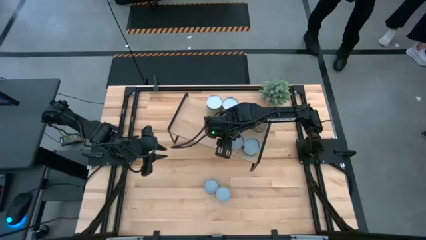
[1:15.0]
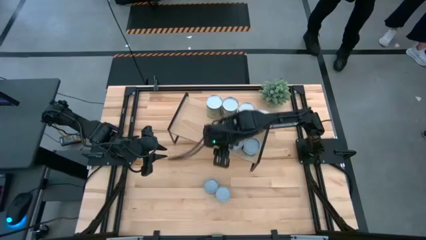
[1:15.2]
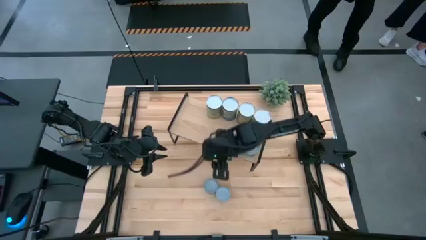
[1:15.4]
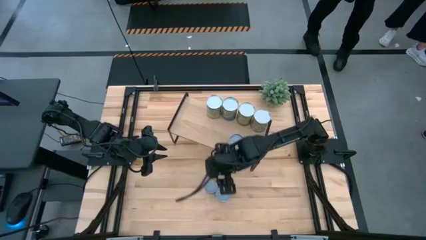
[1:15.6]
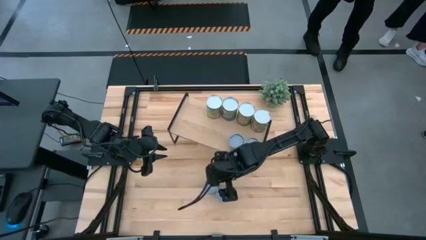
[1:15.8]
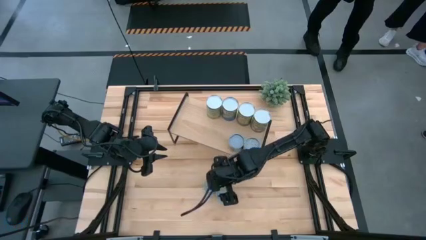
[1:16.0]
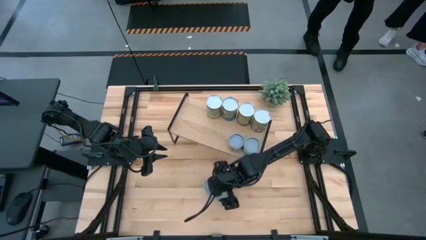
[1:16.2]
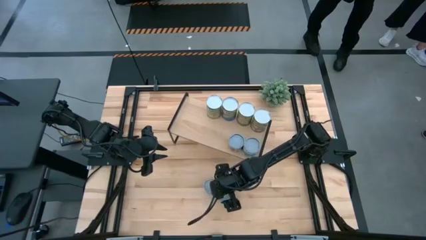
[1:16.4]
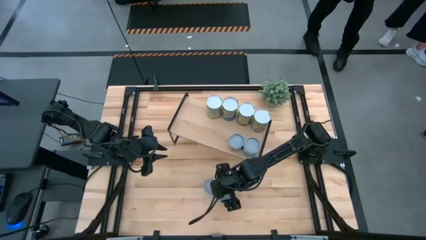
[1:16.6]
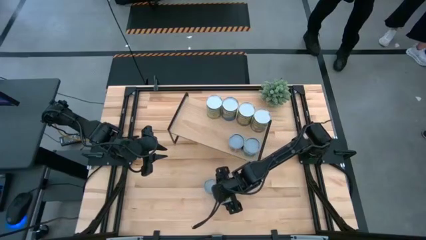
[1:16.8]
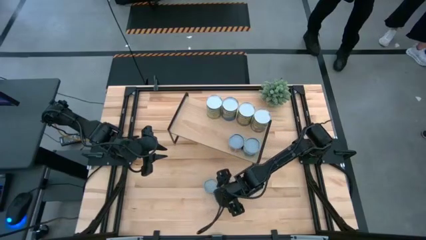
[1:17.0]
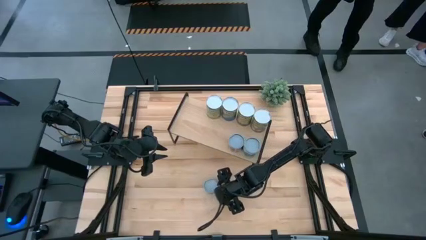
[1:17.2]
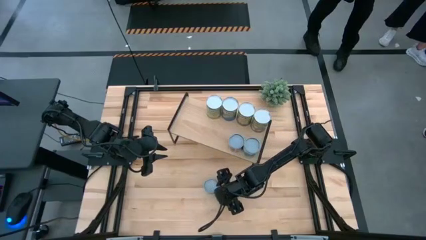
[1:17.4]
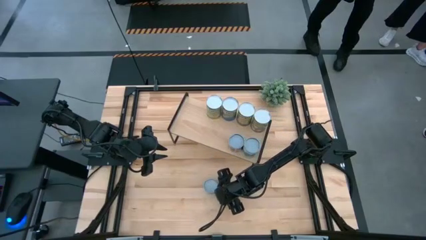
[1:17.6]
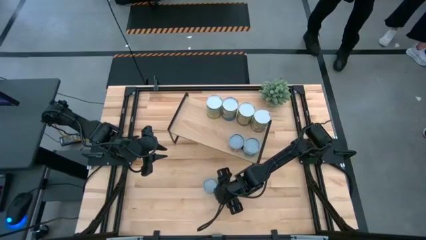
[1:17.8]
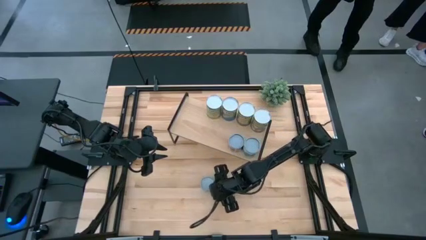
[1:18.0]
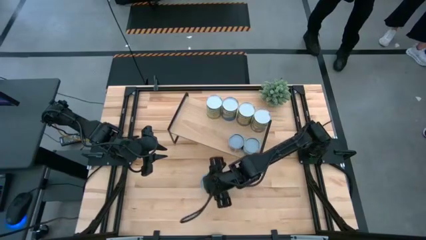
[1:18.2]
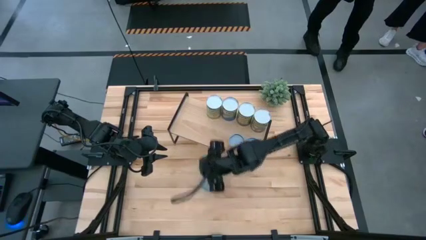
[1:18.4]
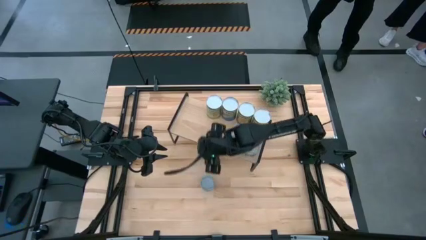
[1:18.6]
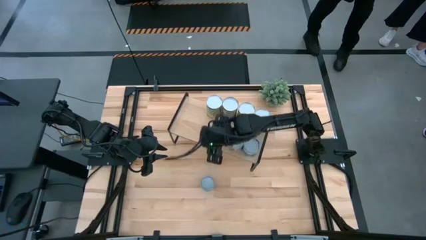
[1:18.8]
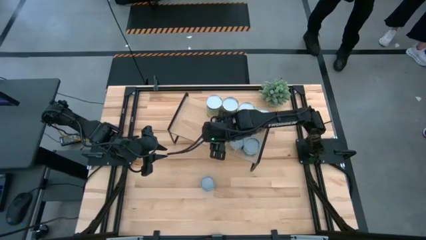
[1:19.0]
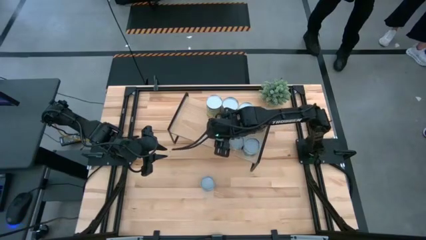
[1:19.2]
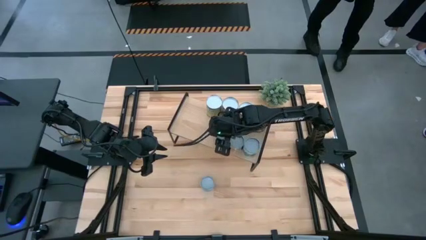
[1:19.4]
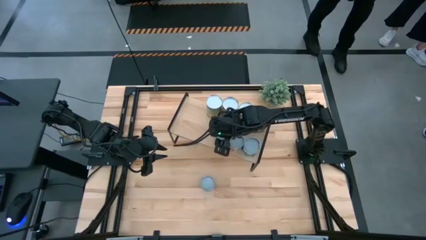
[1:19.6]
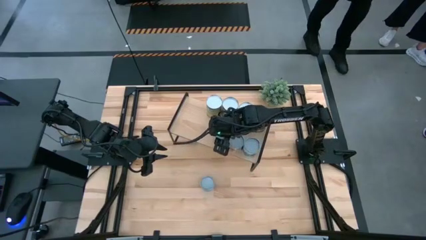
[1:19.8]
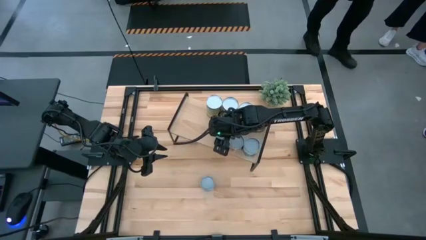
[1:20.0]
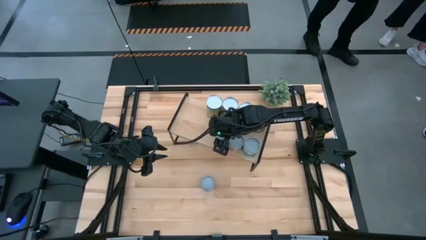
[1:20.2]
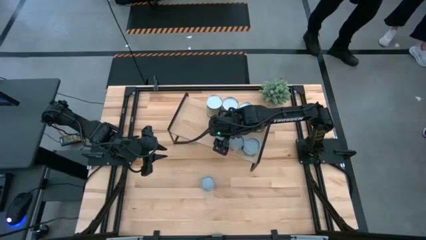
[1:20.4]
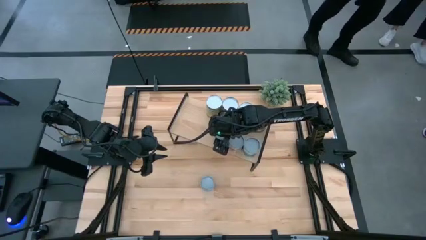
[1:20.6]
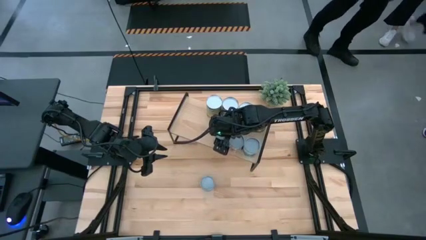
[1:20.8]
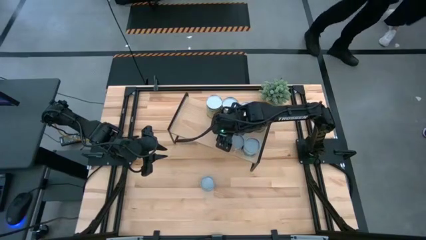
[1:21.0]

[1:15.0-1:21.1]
Task: Pick and place cans onto a shelf
Put the canned green peas on the shelf

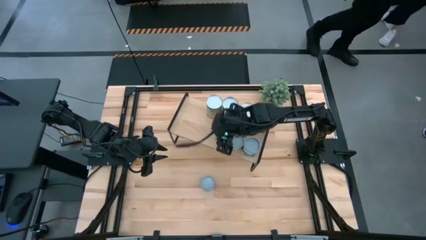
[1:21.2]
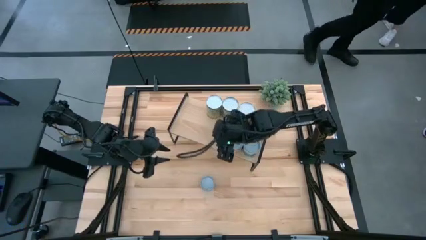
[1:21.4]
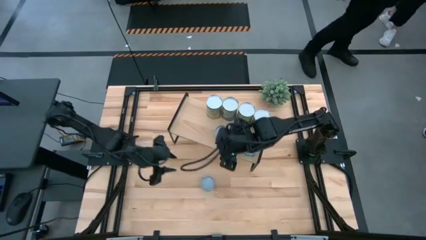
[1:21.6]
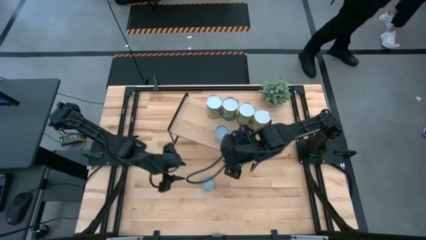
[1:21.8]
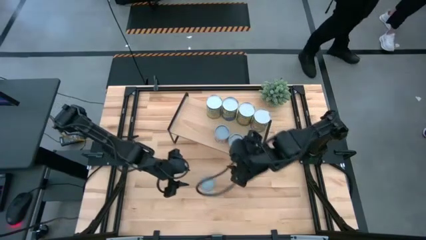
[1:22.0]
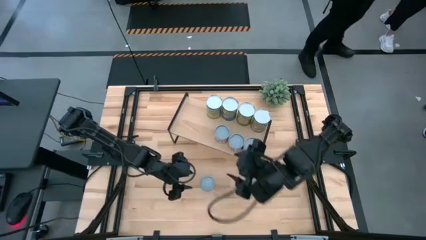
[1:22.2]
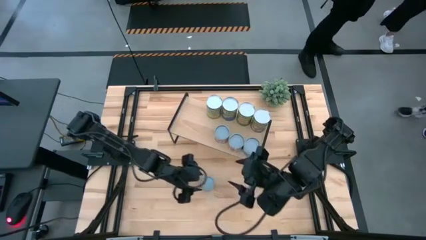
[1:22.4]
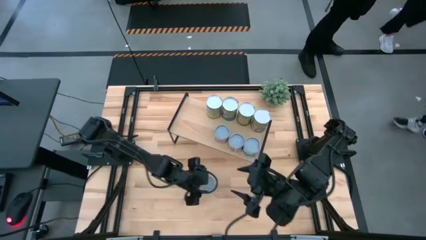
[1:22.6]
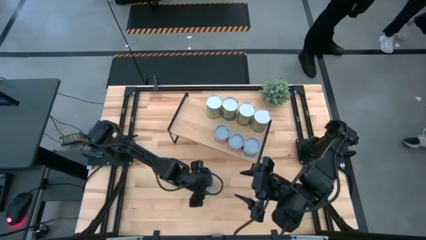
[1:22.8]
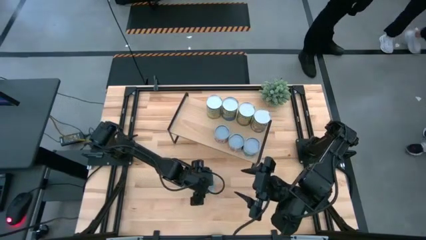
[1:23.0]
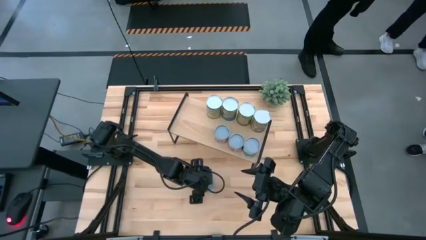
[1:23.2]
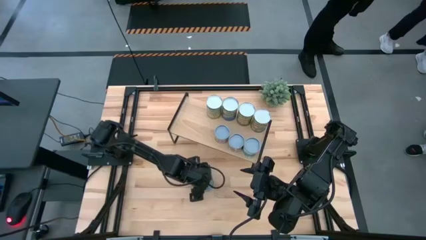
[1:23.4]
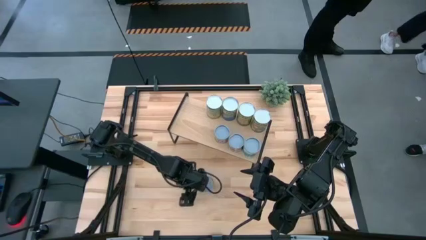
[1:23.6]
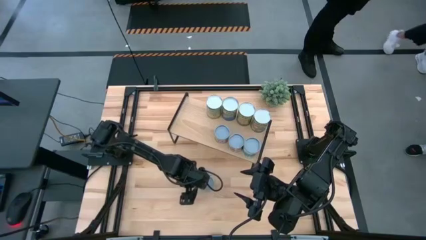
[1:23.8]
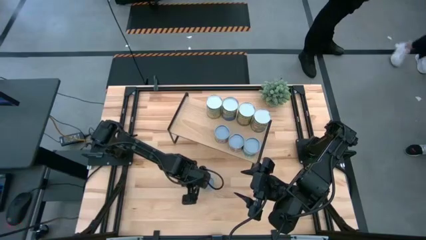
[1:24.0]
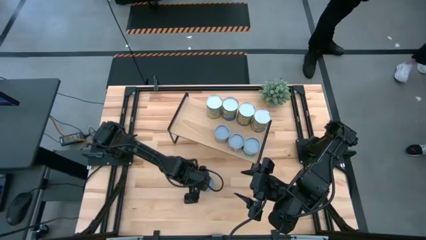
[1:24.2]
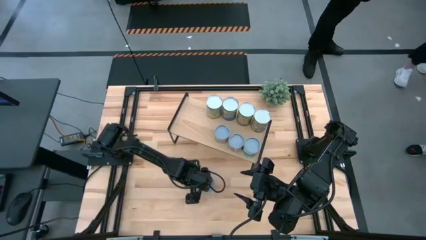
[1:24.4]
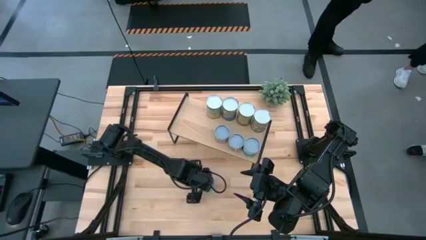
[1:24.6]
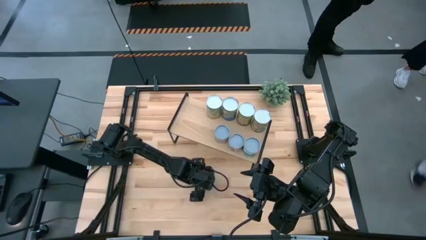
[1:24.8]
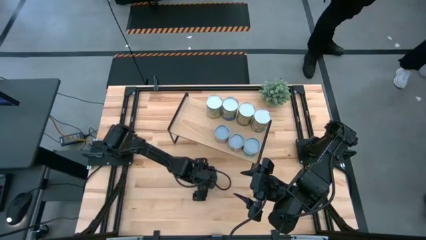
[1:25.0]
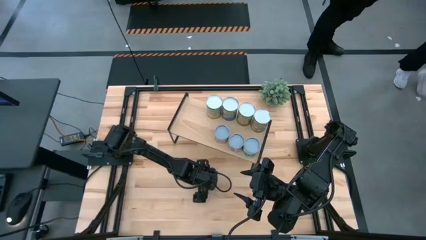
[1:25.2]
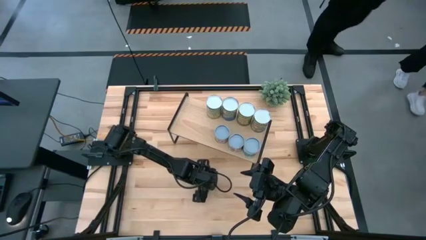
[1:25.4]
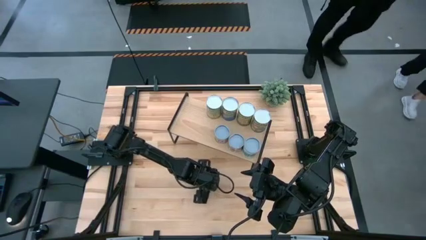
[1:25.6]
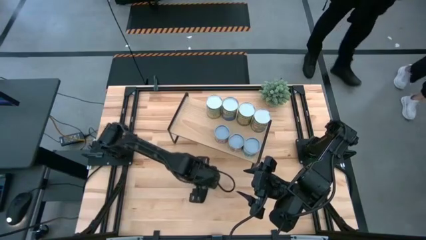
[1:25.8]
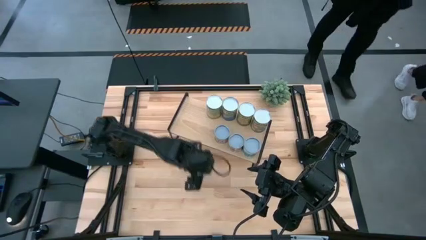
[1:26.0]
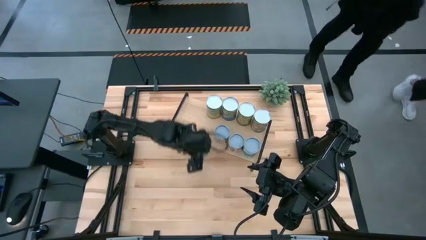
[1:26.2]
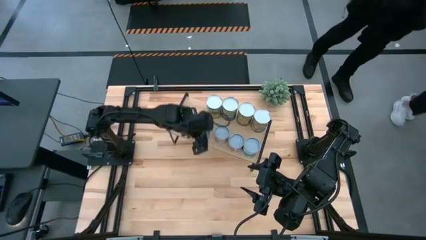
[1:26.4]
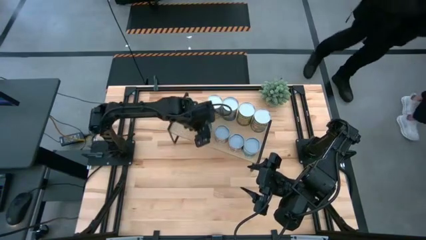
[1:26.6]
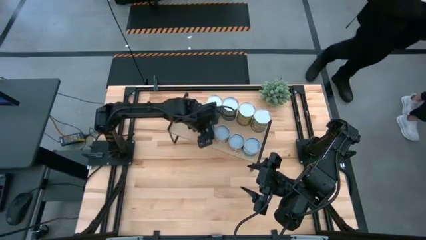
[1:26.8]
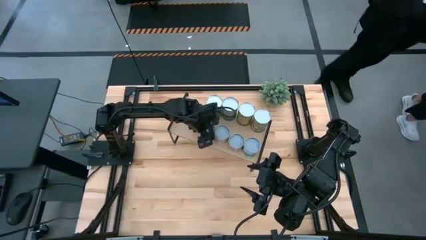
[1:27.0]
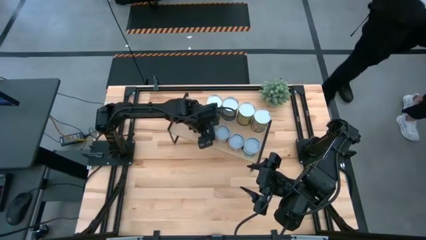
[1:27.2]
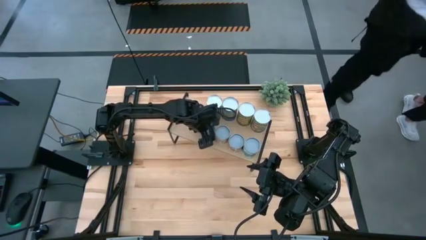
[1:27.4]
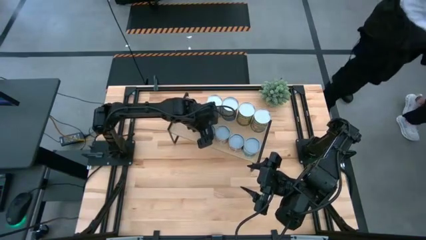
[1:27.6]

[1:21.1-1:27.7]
Put the canned tuna fish on the shelf

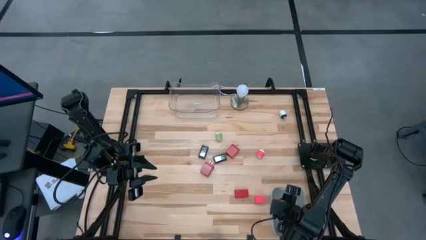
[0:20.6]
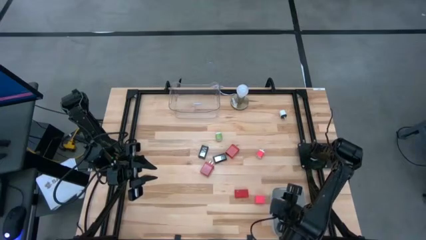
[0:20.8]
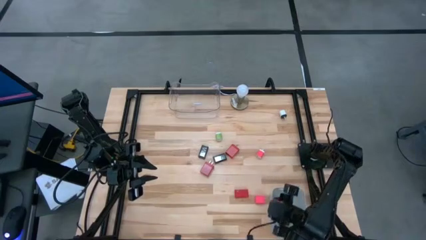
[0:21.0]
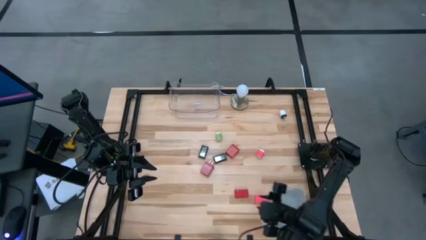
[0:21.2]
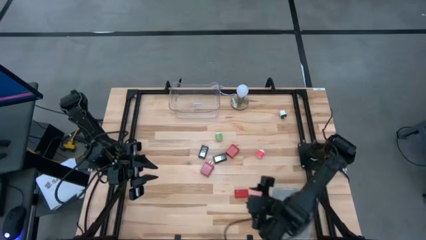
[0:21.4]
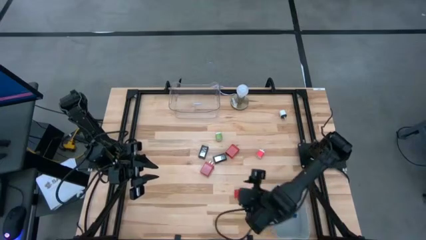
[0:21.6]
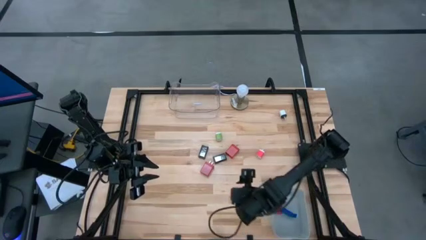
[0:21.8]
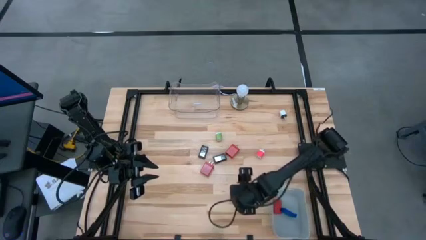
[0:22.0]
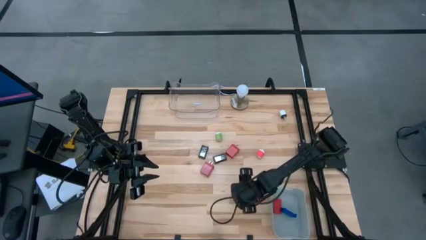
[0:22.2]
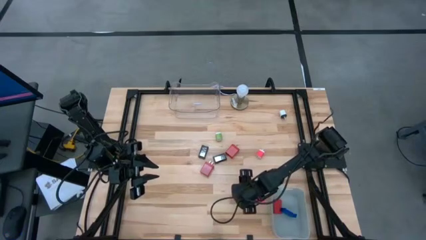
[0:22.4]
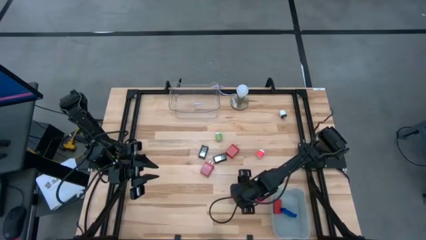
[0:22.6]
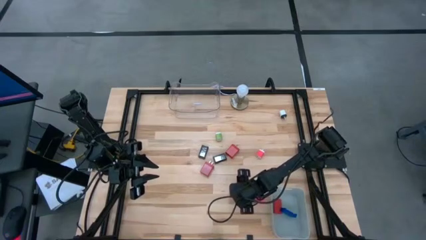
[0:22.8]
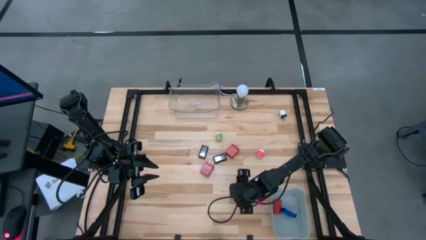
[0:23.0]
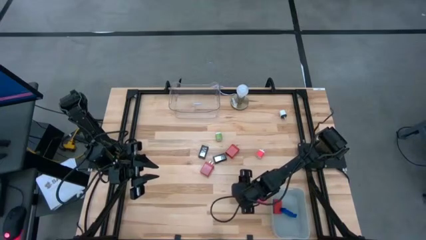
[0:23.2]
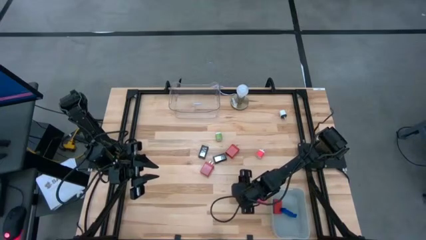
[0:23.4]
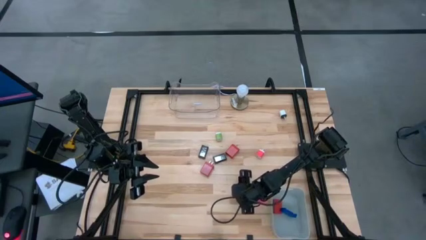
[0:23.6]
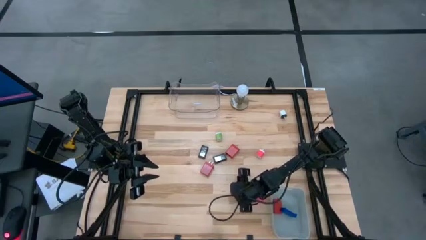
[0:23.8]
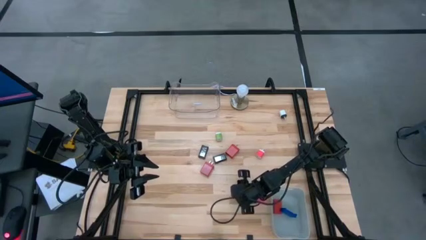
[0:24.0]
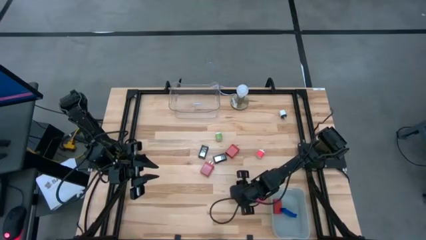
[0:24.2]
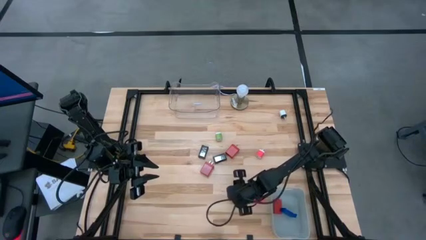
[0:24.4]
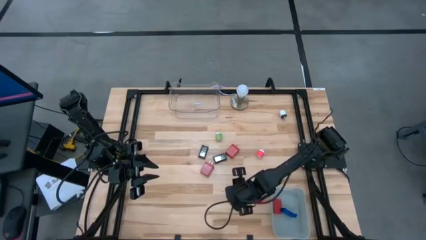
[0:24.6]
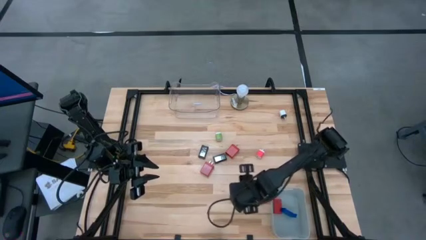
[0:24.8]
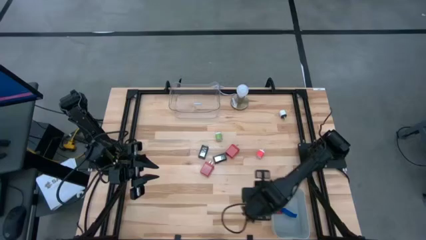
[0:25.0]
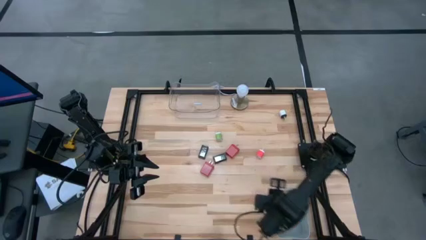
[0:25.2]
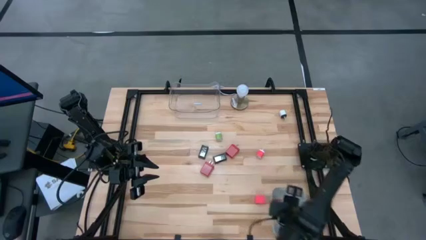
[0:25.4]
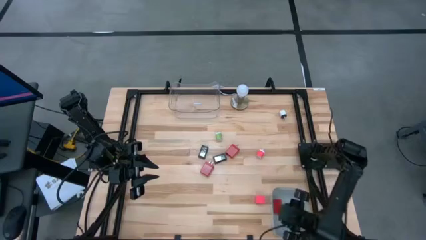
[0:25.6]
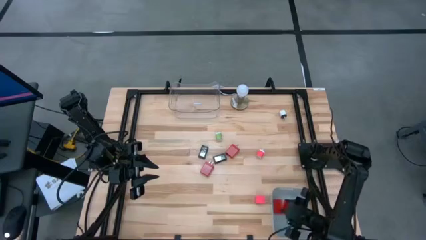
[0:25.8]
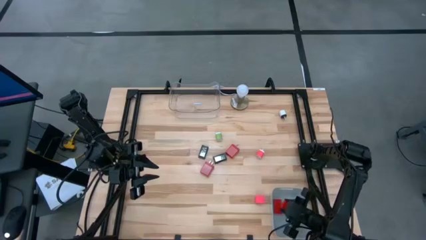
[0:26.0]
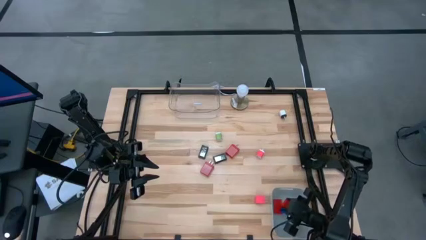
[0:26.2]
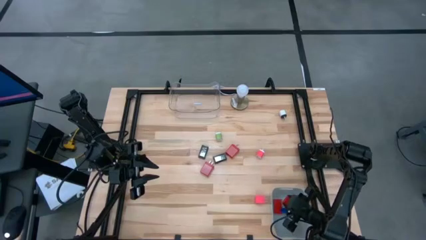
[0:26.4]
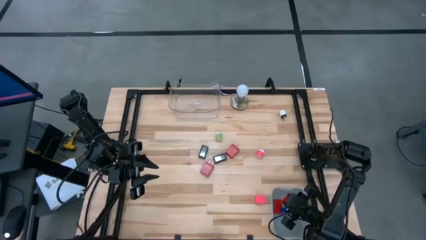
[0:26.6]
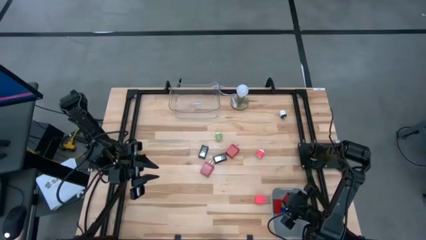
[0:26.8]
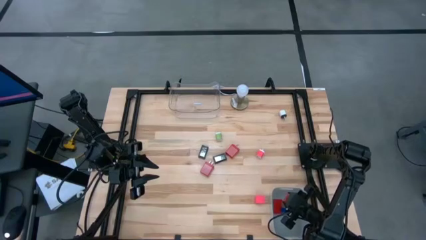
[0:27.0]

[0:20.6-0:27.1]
Task: Pick & Place Office items
Put the red digital clock into the gray bin
